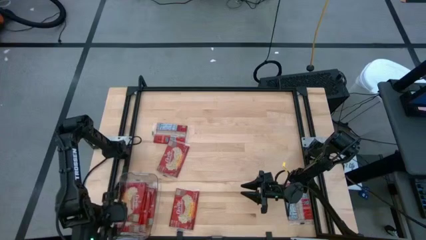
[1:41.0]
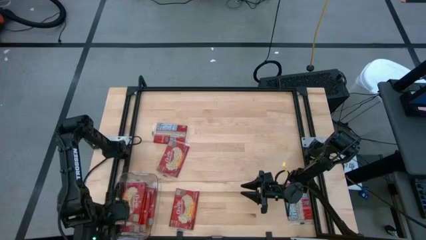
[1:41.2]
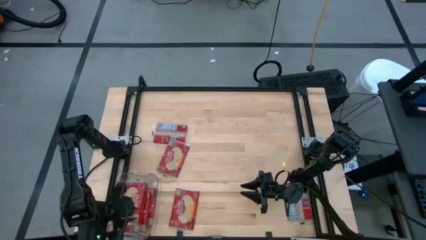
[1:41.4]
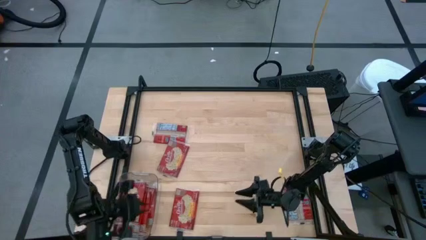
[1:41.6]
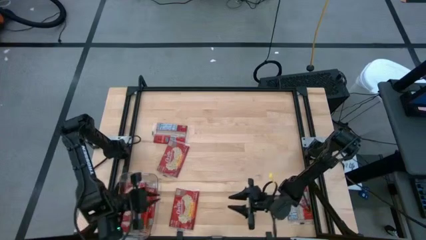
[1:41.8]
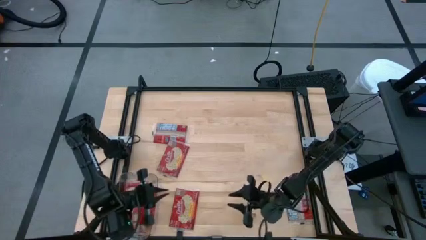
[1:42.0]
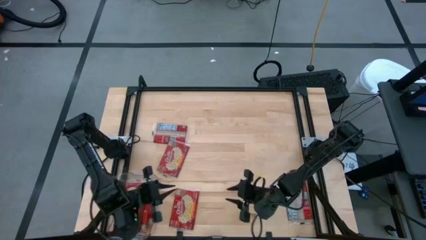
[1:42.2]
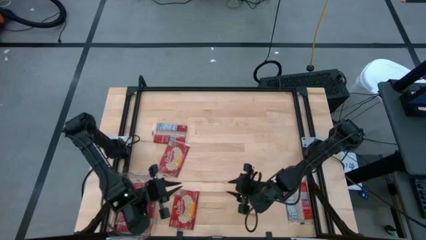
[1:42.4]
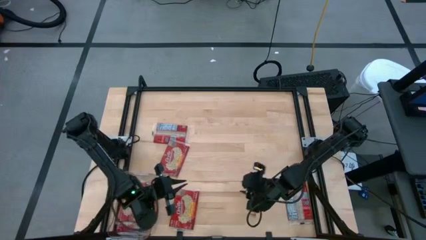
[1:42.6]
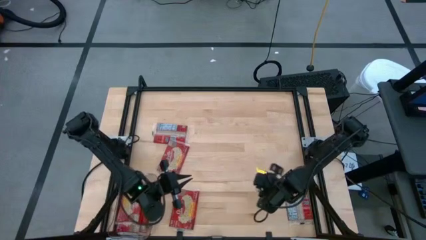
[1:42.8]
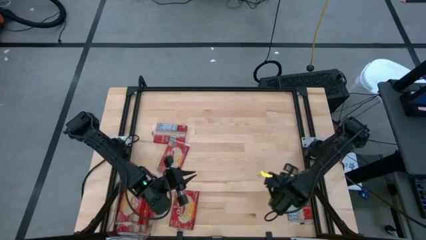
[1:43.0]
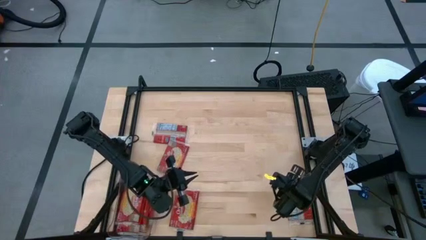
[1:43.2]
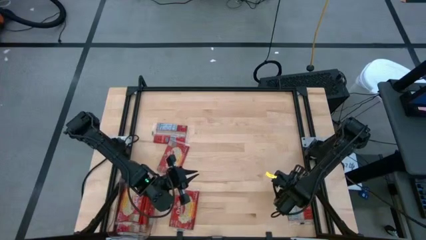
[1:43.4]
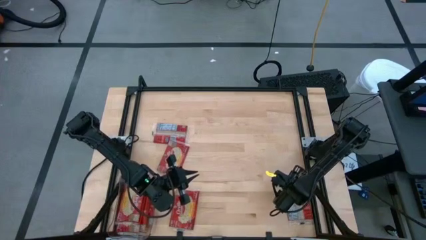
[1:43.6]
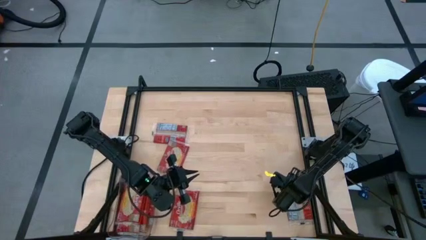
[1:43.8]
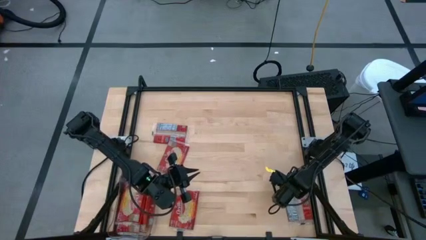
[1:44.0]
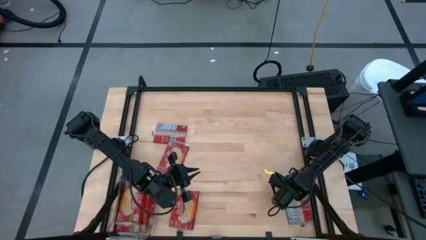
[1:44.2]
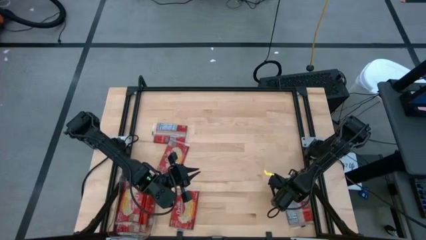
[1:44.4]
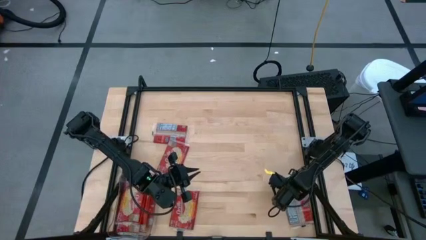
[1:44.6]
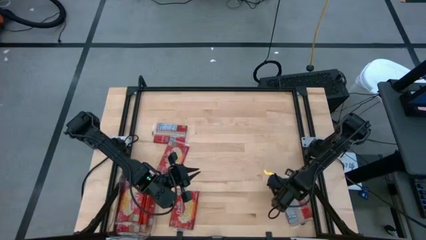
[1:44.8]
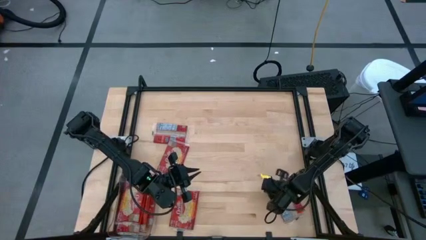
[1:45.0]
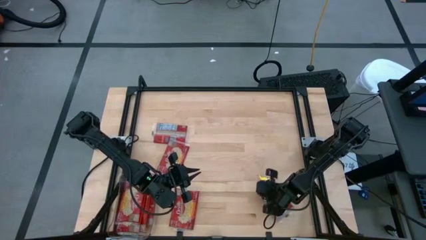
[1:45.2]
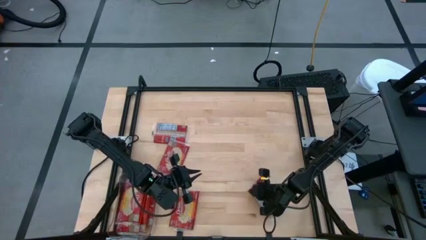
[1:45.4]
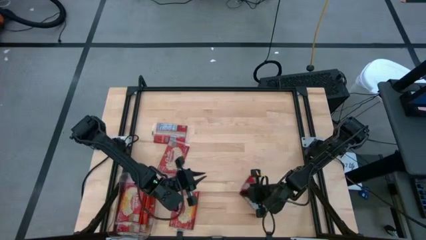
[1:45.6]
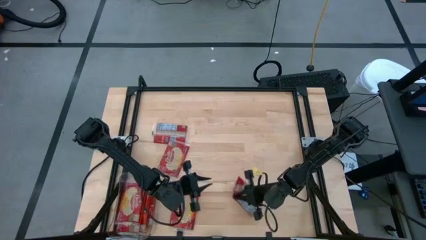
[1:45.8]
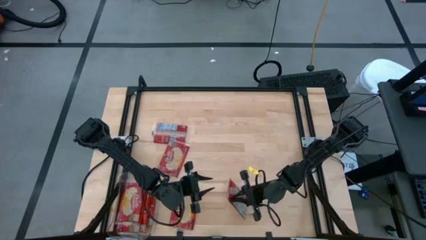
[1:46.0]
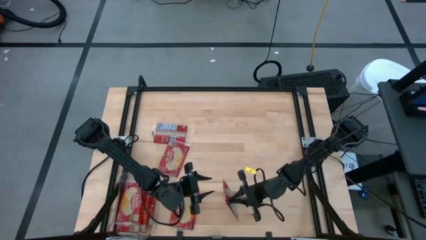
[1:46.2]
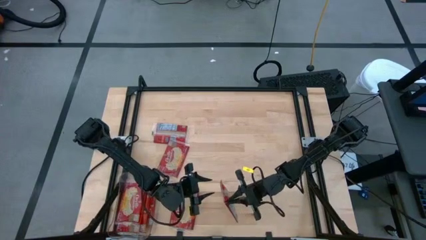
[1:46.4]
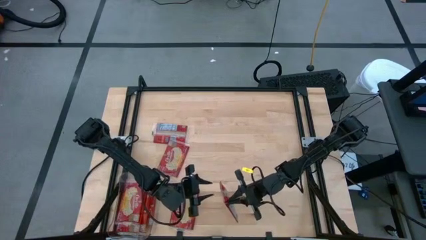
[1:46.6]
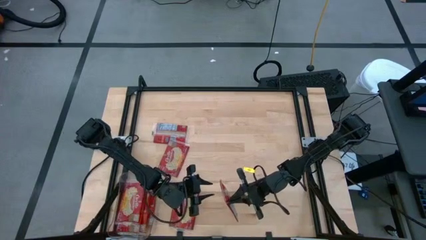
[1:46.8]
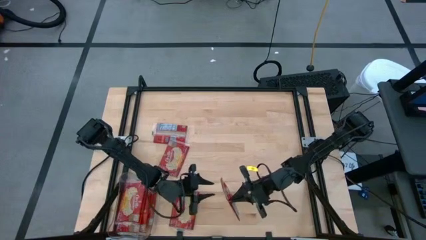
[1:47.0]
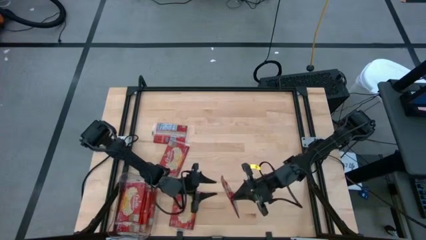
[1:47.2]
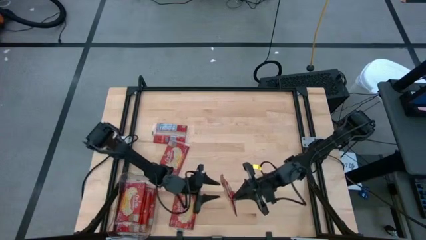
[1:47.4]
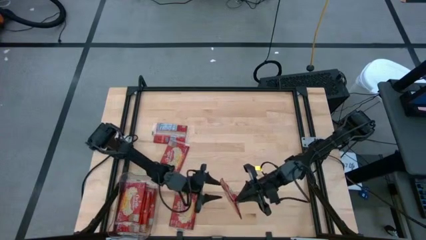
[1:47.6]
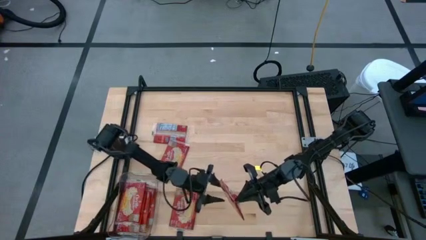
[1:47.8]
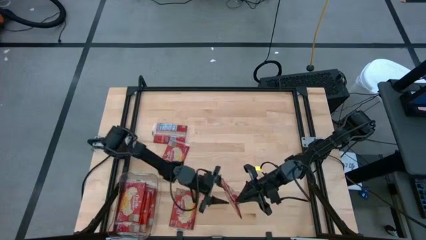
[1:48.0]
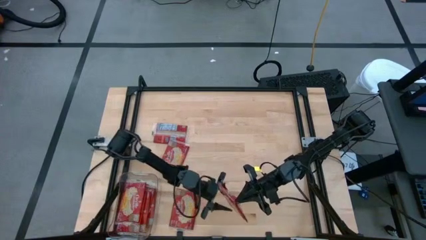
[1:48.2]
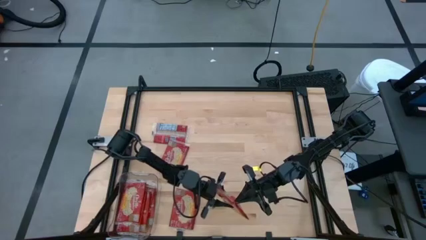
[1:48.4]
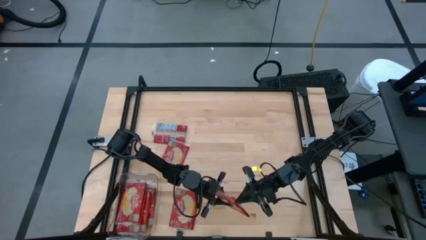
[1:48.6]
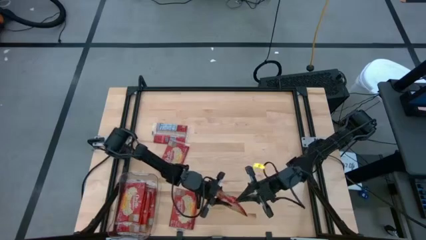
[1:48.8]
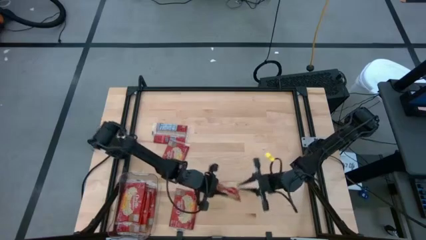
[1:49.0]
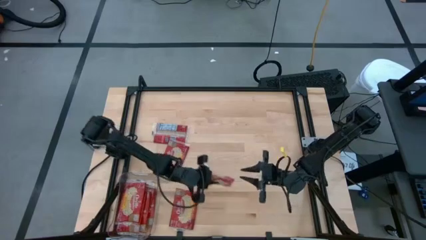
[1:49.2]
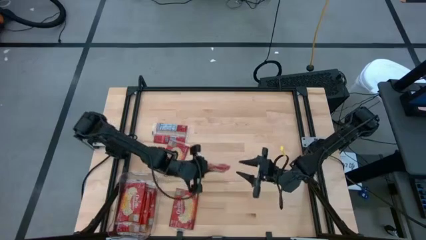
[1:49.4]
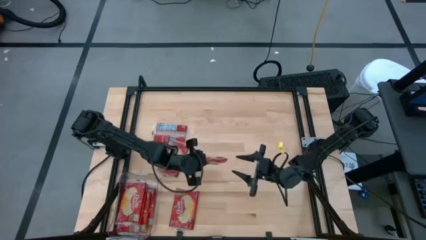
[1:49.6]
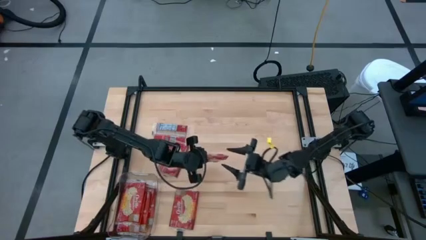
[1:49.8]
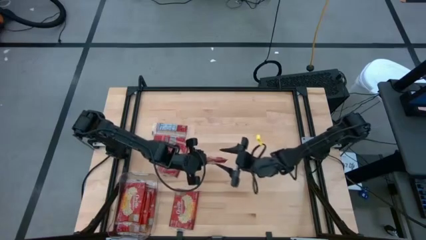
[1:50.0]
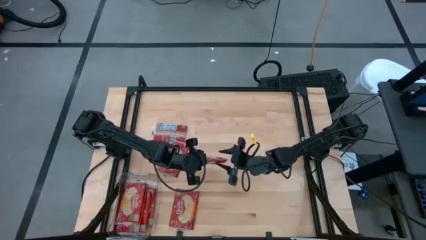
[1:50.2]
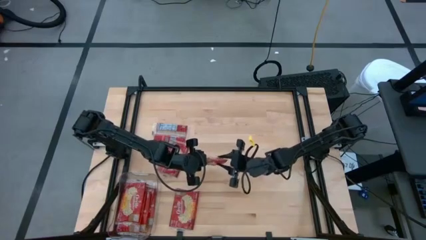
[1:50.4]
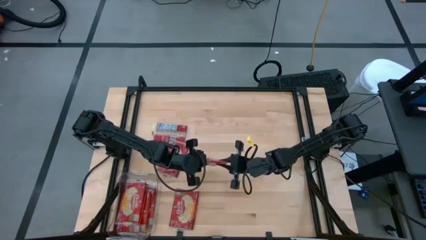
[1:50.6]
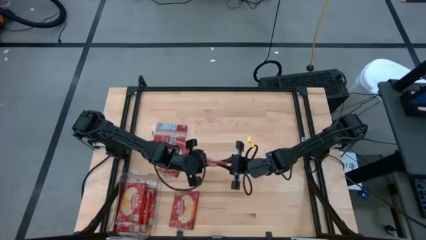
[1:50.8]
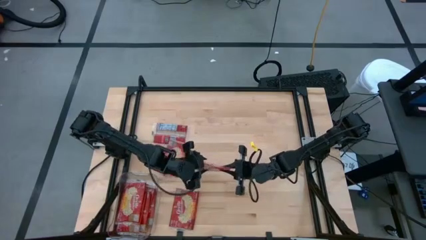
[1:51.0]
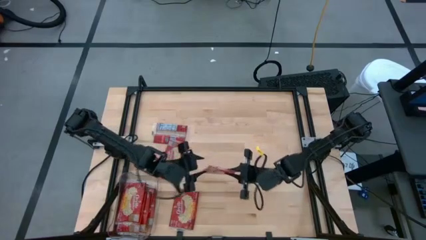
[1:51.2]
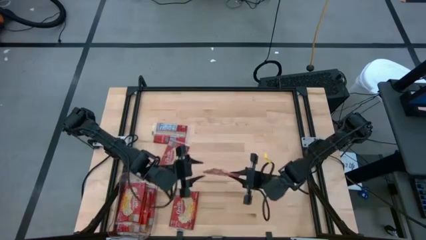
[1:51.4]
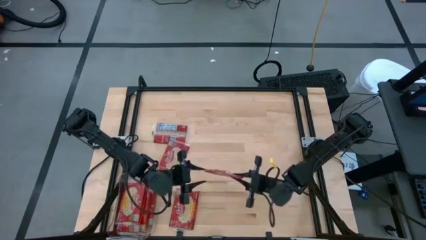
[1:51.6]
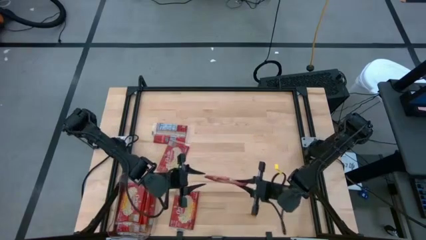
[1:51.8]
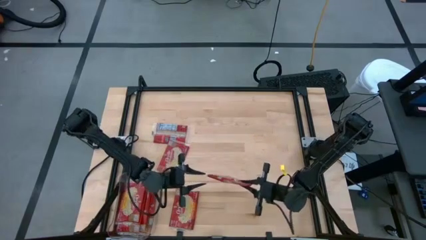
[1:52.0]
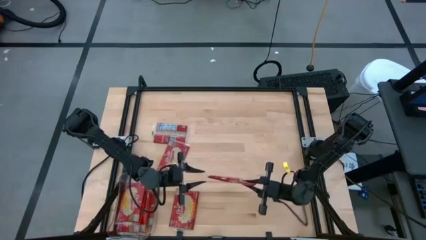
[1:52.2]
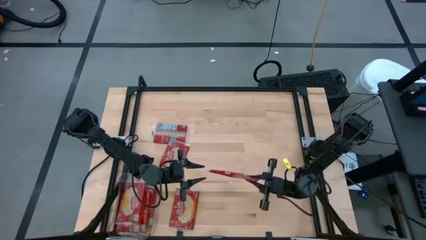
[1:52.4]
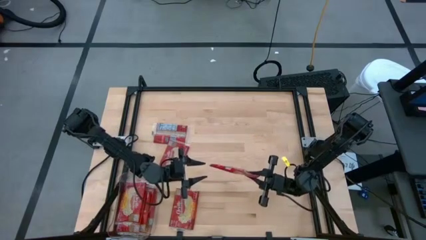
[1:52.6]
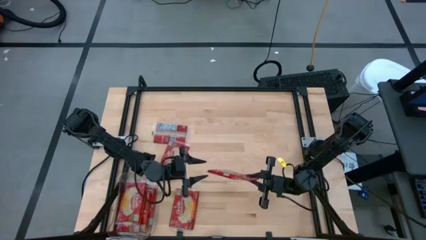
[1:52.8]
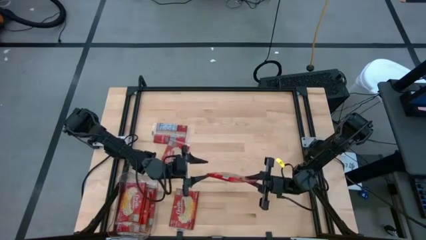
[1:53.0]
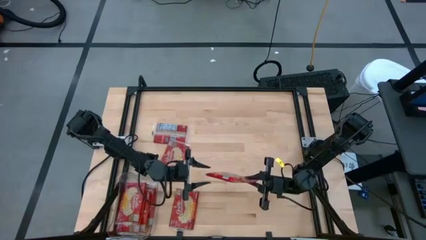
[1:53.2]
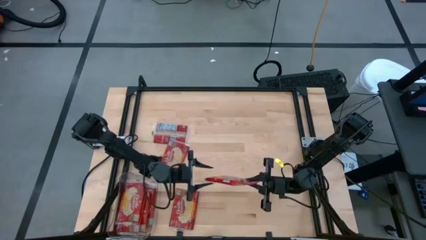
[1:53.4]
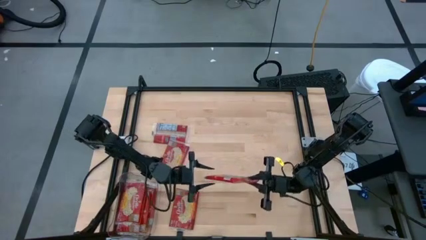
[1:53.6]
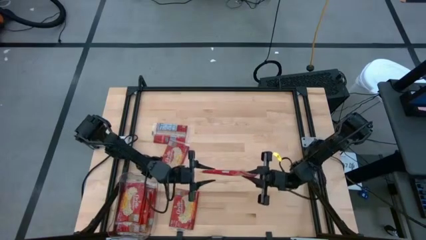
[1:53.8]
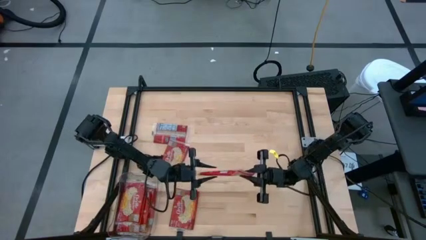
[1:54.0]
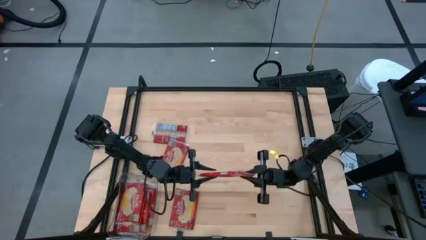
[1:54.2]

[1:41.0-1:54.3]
Task: Sort popcorn bags into baskets
Put the popcorn bag into the transparent bin

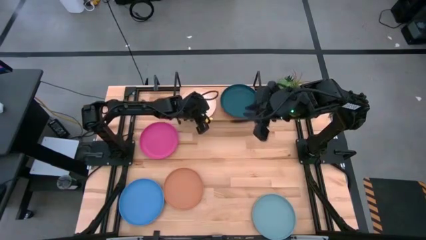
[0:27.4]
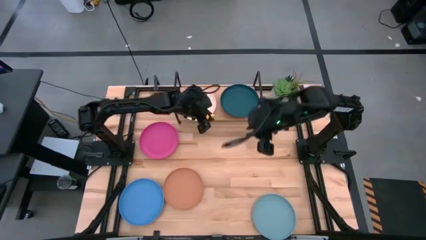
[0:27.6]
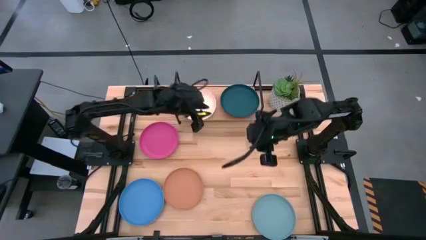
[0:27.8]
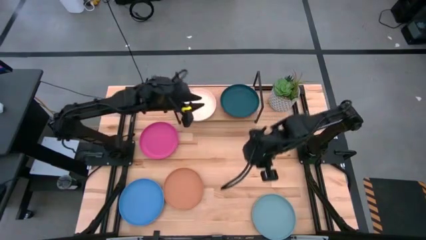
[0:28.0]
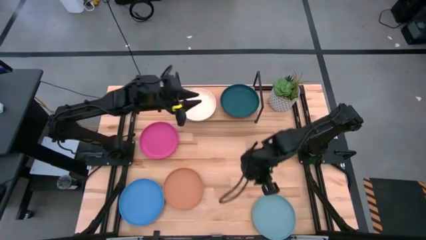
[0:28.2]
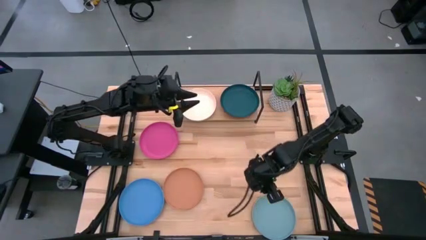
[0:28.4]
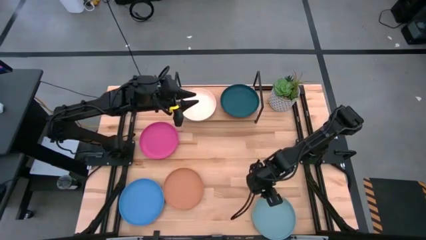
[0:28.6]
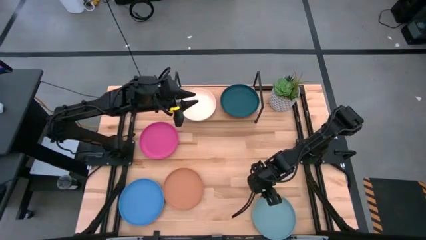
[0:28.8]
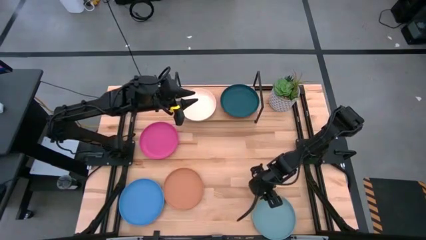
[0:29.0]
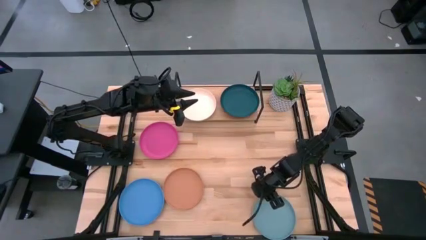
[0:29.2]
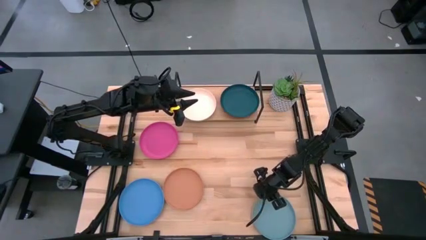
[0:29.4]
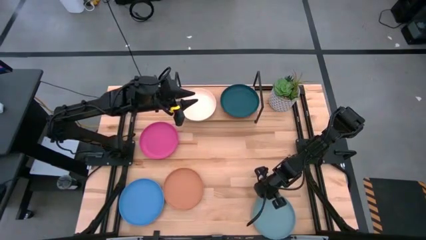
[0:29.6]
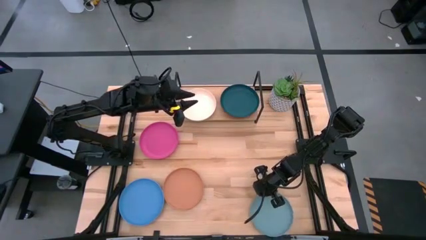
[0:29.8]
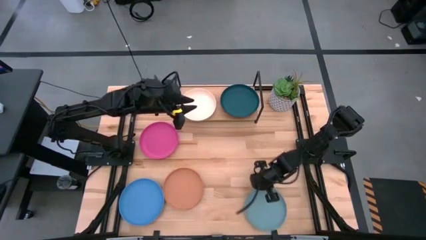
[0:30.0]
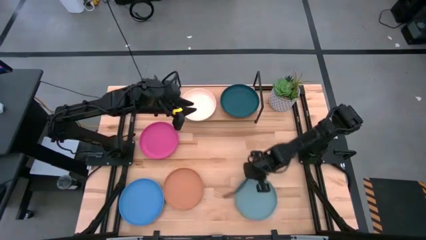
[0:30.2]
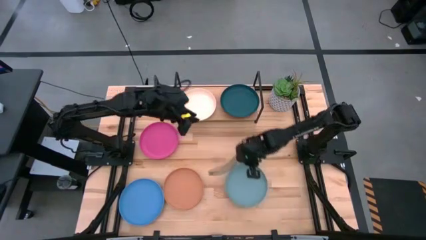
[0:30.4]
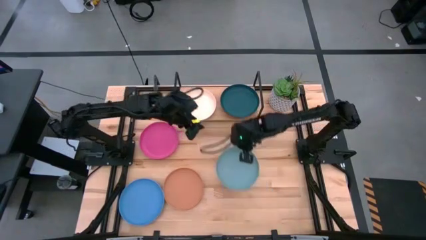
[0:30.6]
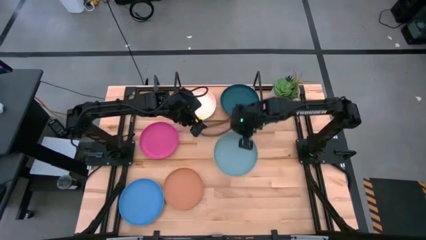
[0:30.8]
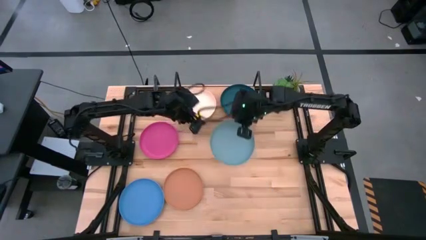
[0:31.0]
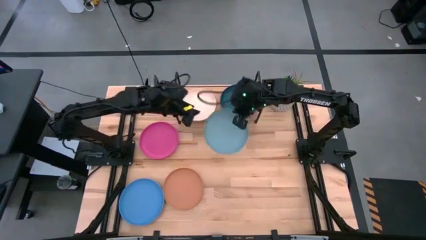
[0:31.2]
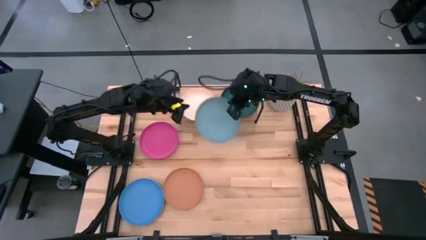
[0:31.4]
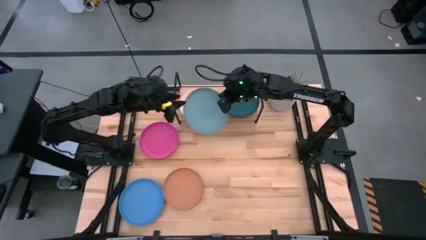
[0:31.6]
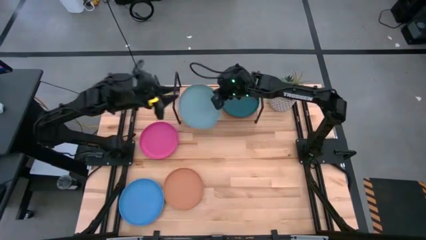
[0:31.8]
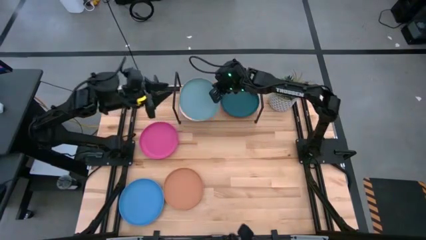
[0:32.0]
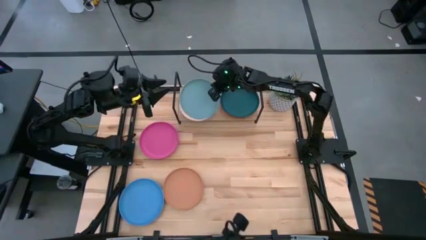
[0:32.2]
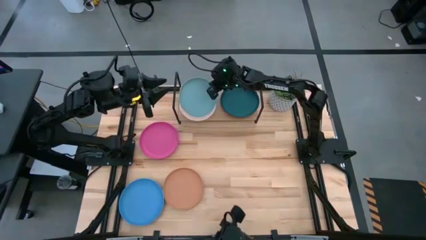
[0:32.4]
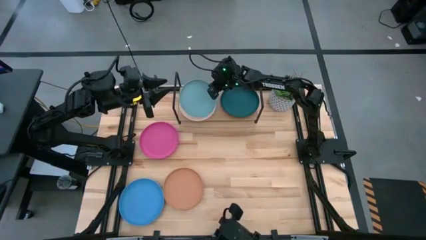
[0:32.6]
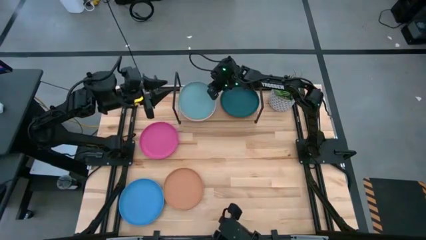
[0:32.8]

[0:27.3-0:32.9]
Task: Place and stack plates onto a shelf
Stack the light blue plate on top of the light orange plate on the shelf
